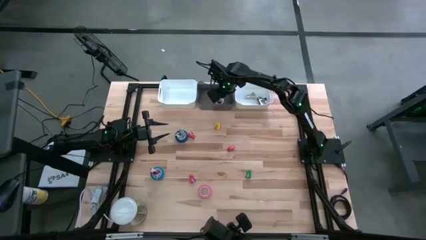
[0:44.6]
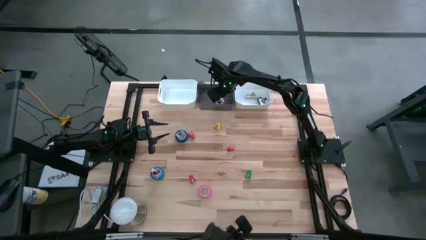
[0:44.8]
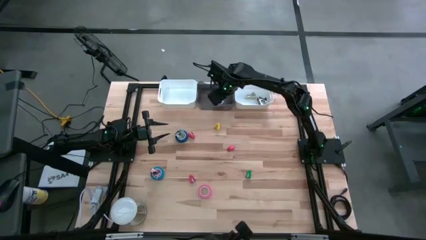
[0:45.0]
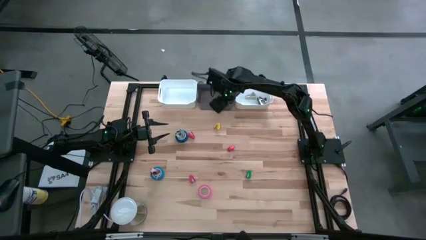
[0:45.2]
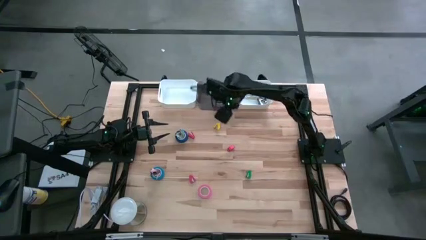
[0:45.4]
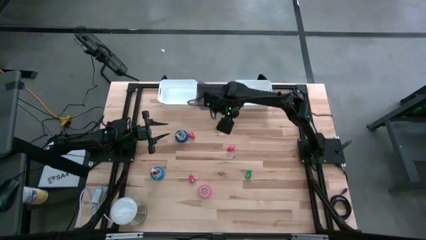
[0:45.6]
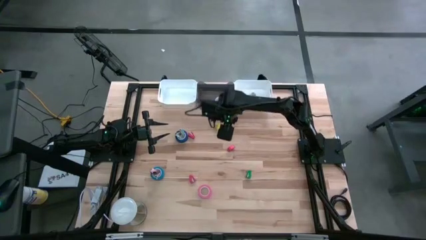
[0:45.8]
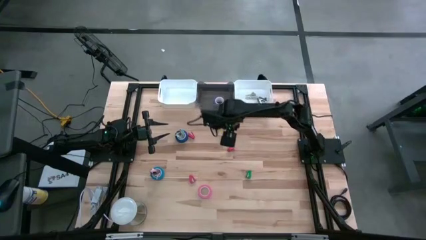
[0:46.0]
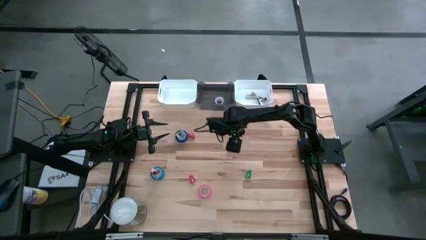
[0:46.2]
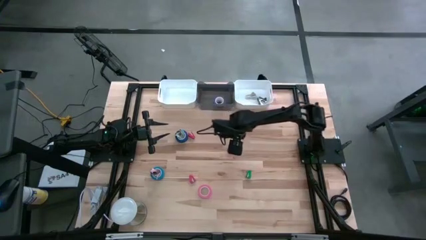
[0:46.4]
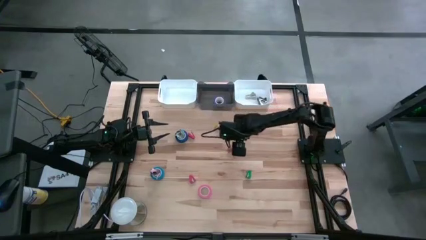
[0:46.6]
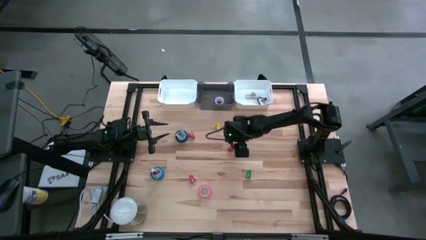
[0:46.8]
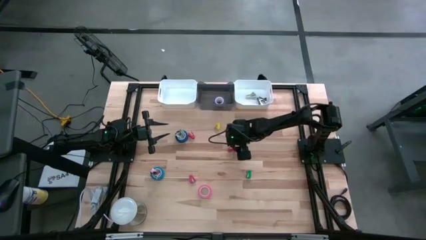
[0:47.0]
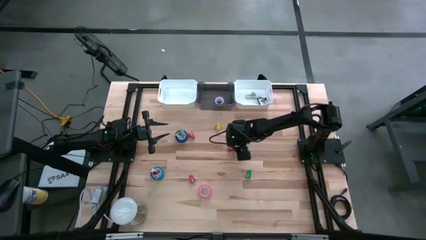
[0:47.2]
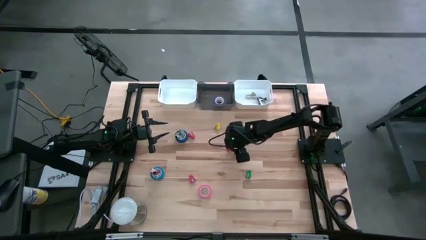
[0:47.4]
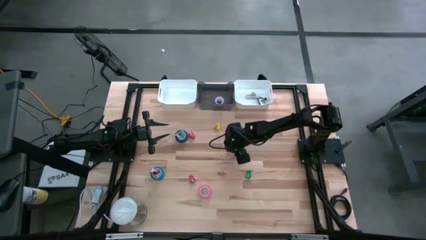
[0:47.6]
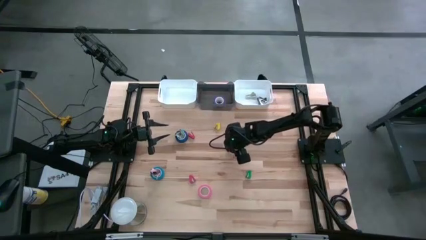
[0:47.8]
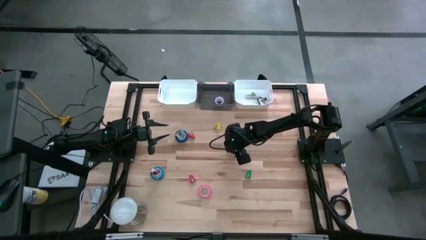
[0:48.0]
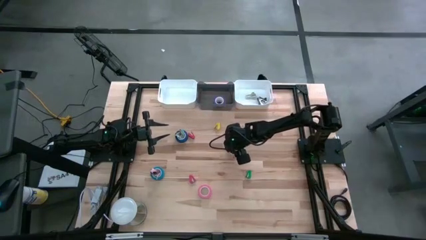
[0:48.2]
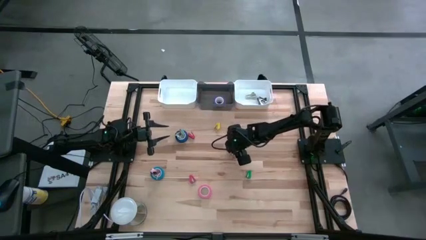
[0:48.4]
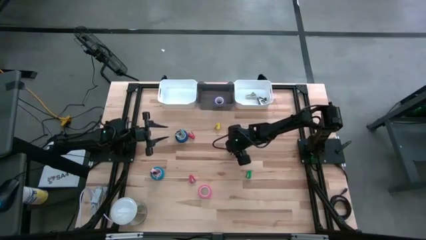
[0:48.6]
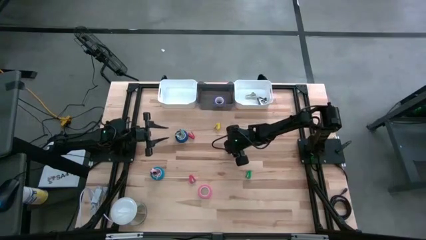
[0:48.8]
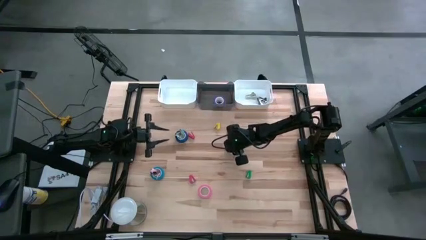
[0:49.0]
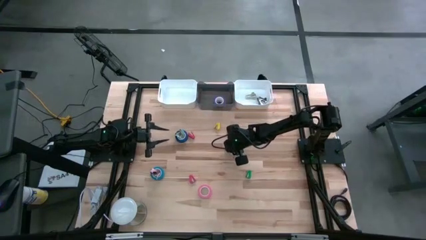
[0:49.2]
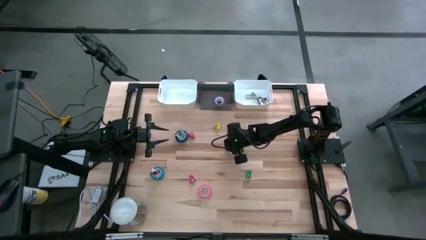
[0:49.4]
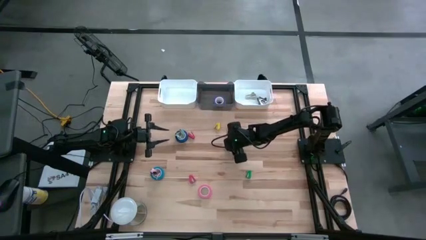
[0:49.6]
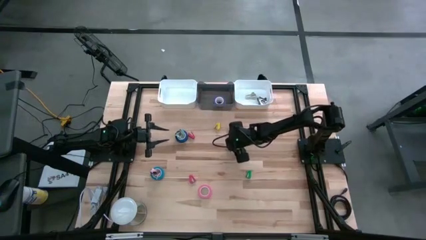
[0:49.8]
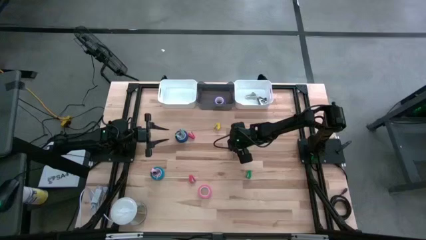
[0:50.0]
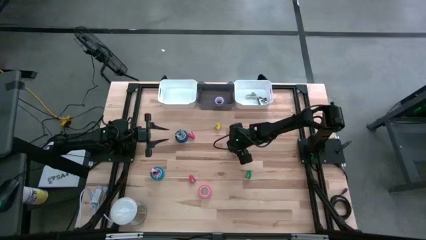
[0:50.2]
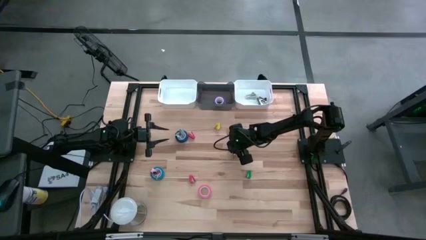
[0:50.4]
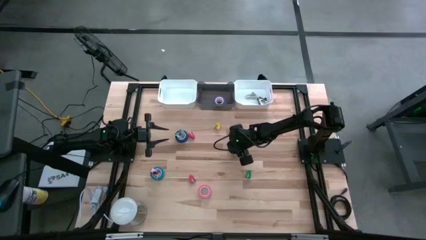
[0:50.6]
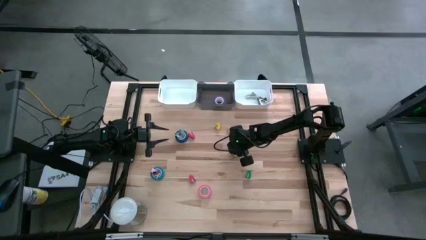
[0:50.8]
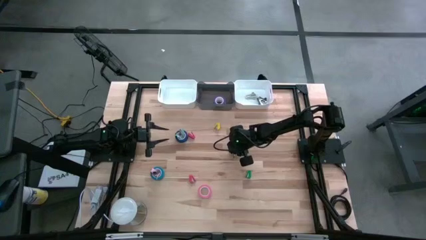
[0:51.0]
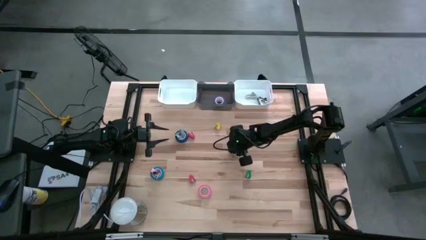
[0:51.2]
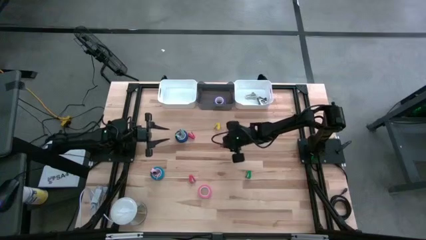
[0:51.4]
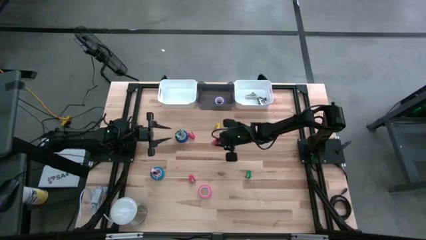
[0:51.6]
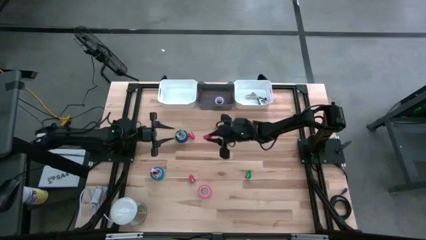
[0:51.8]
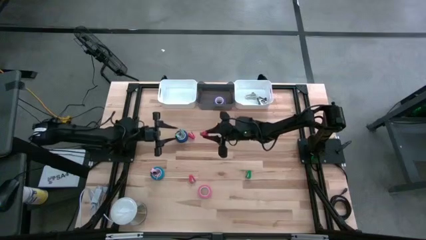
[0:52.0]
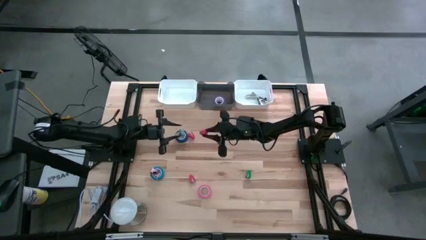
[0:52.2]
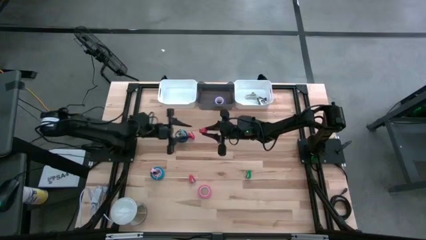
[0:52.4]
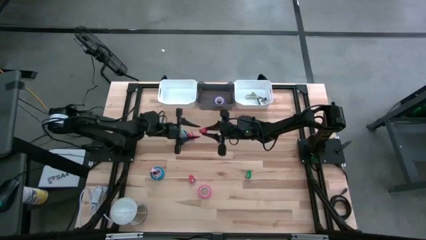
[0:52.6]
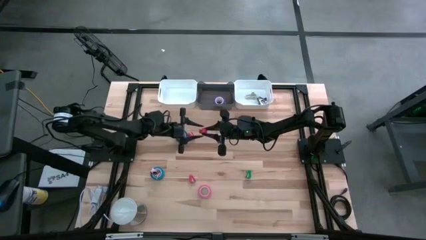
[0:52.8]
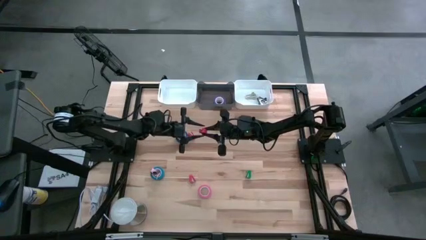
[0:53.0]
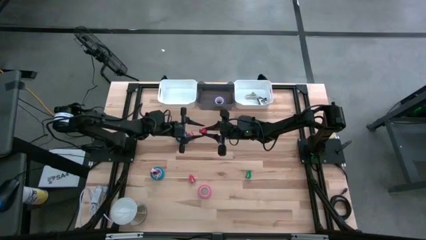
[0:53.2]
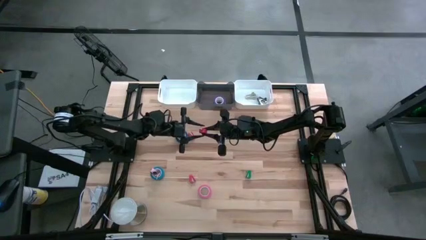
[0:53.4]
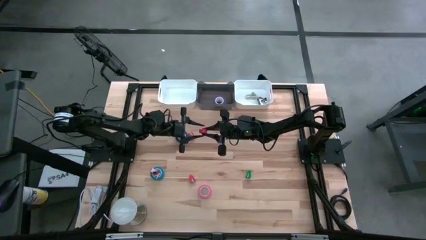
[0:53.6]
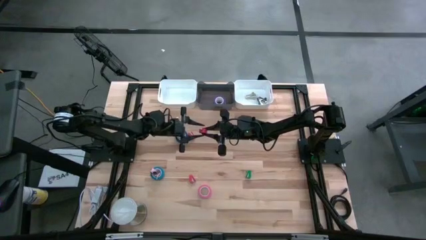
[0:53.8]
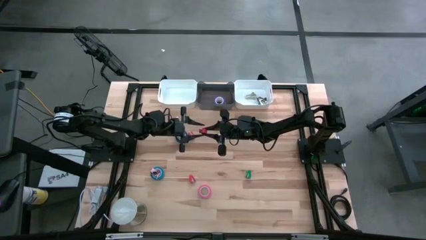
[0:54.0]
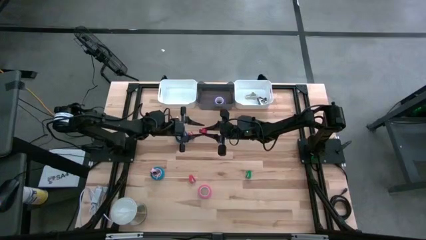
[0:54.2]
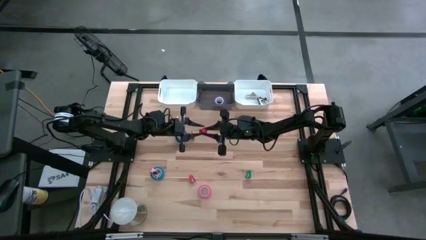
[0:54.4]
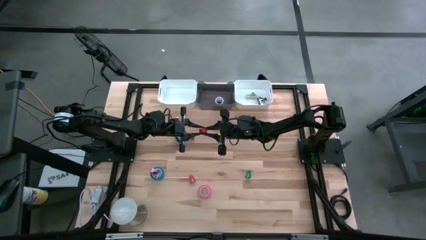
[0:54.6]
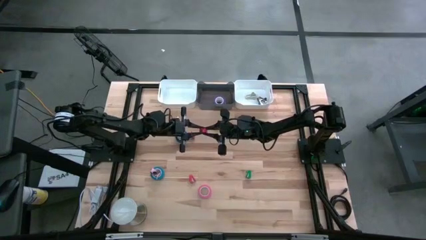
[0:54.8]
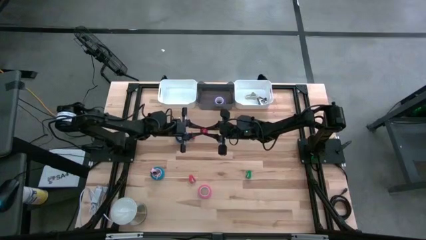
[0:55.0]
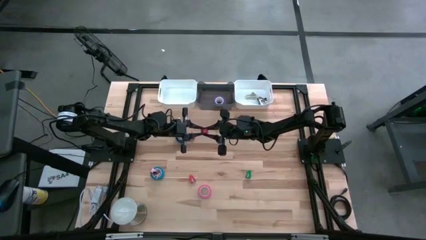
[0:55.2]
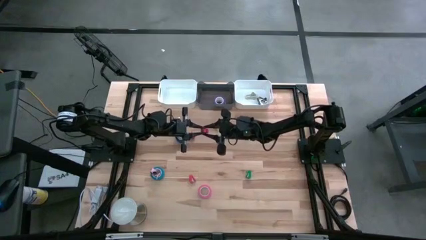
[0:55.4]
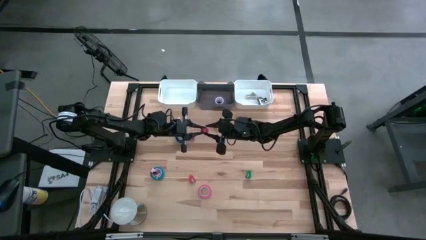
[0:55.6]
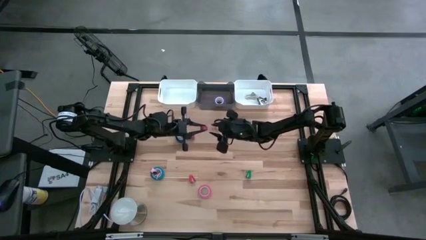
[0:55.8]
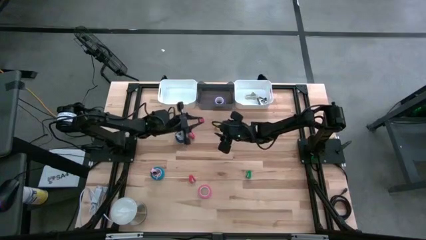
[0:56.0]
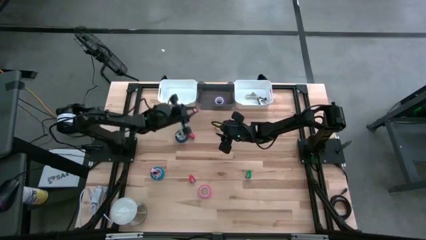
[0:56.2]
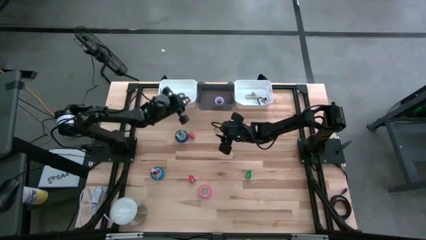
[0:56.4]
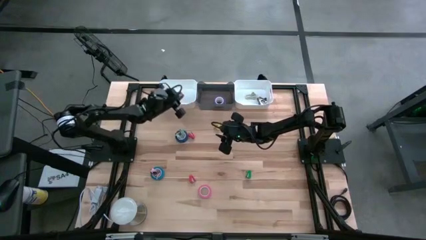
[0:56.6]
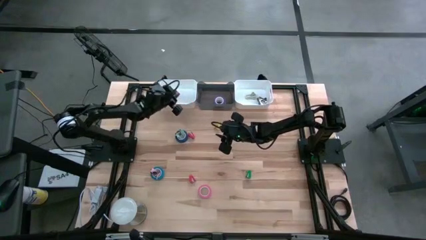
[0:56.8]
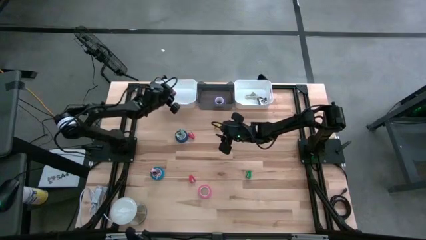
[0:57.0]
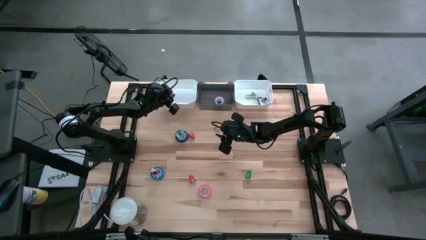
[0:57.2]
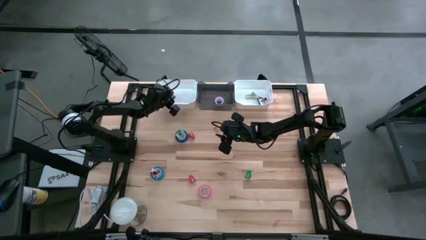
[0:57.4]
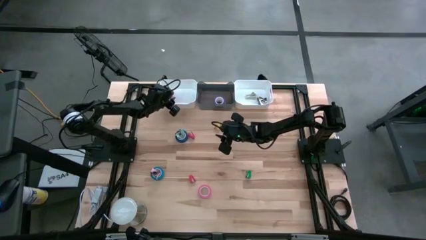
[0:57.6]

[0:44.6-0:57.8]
Task: Pick and place Stapler, Stapler remover, tape
Put the top right red stapler into the left white bin

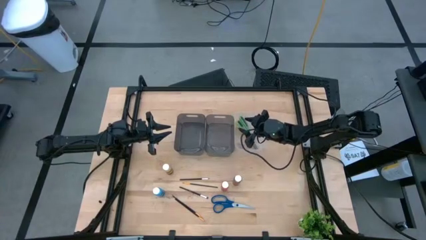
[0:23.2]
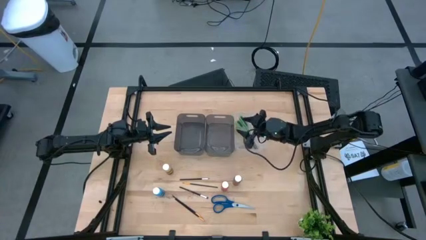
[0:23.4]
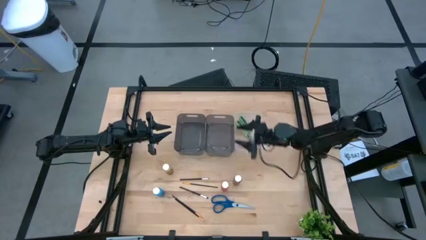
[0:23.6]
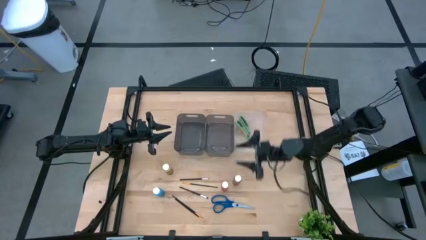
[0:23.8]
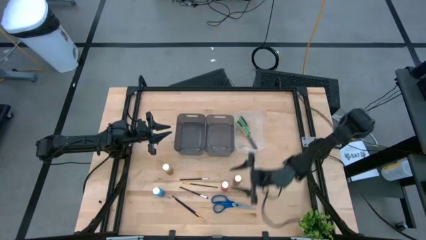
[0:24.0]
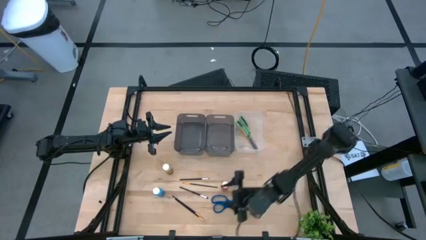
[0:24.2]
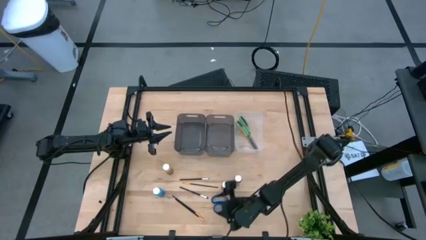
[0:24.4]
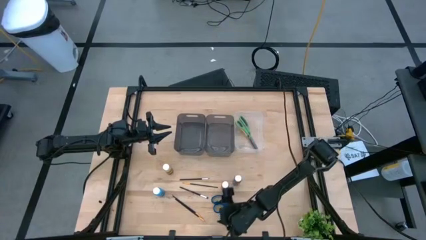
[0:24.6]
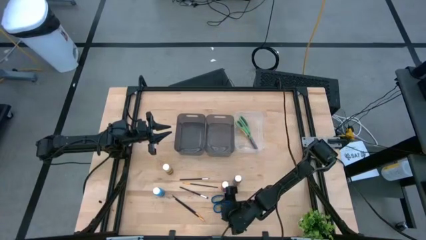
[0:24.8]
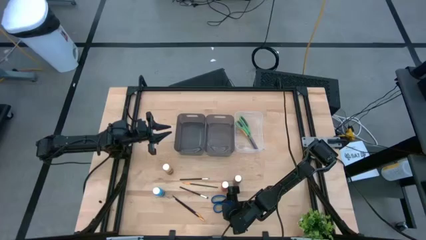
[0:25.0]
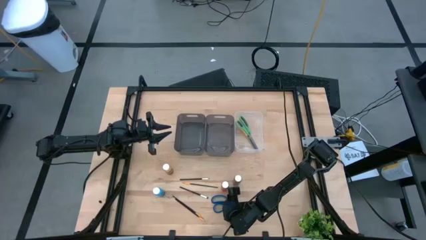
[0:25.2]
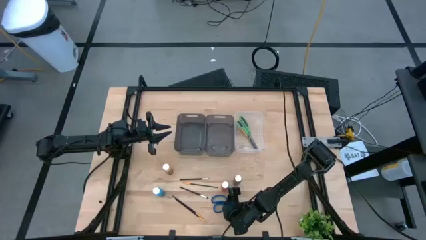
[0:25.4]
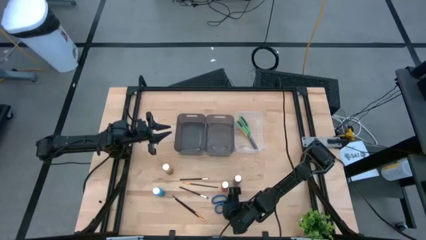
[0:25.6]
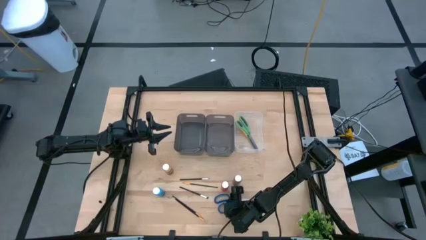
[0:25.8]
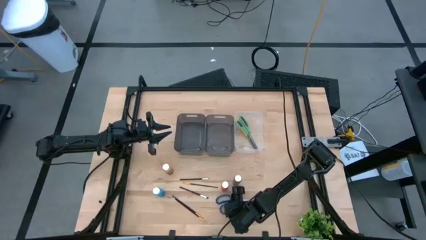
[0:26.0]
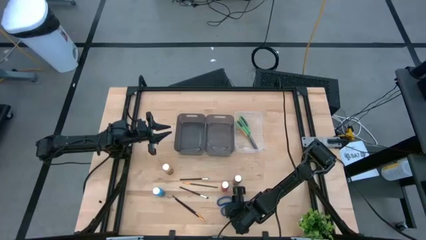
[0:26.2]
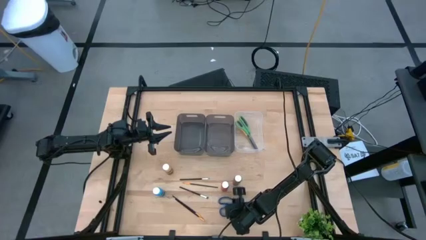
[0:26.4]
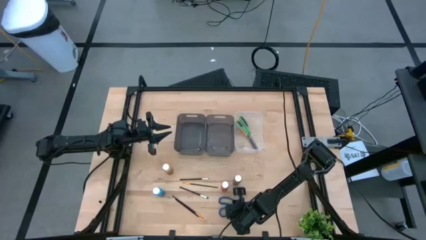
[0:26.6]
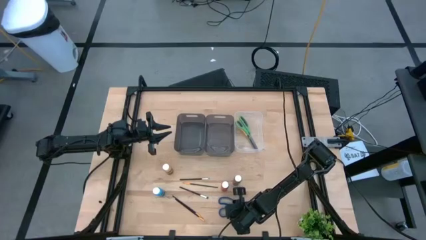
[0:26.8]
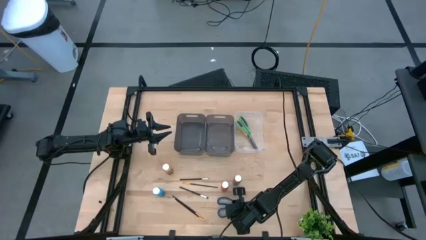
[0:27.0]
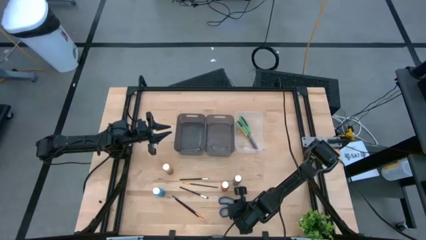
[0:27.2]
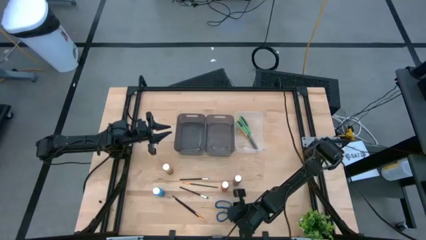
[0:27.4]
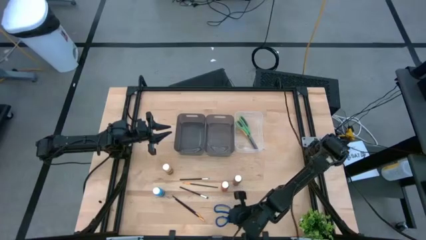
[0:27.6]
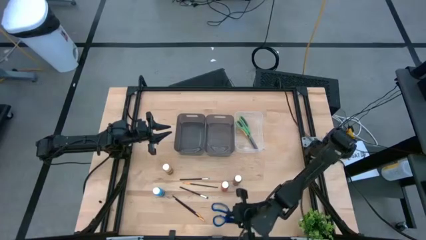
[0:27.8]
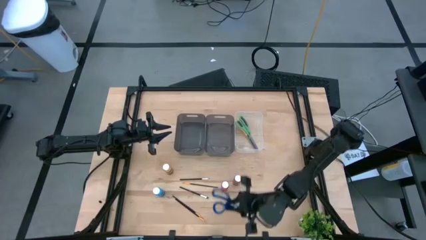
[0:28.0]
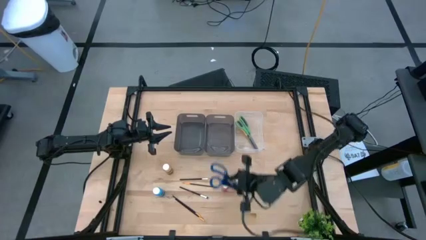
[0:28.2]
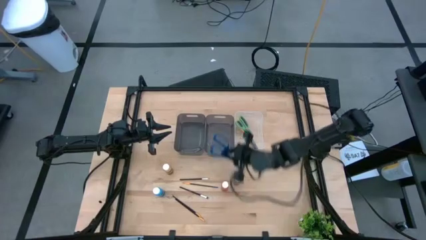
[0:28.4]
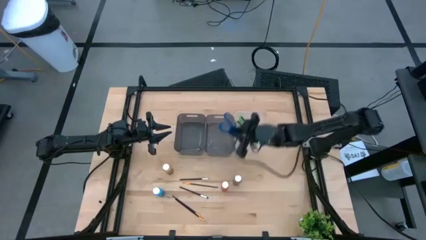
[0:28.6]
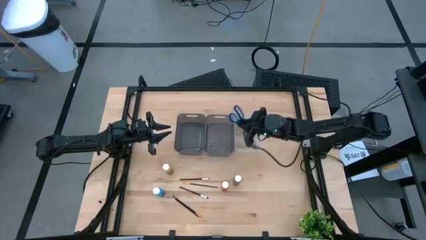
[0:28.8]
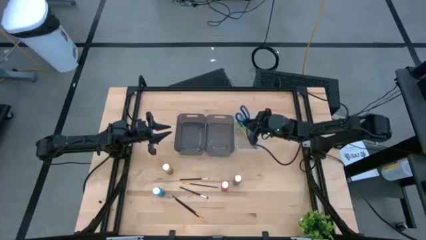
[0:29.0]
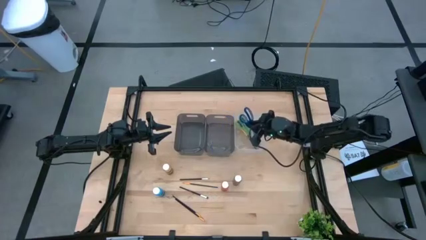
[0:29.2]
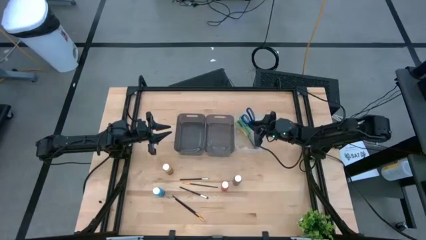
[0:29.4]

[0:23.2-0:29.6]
Task: Pick & Place Paint Supplies
Put the blue scissors into the transparent bin
